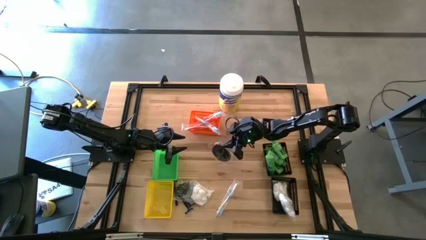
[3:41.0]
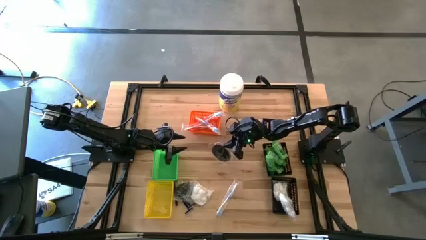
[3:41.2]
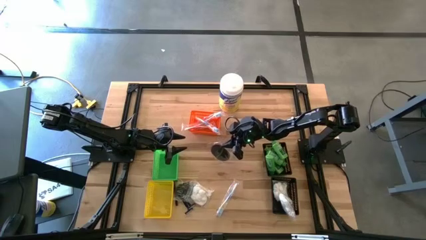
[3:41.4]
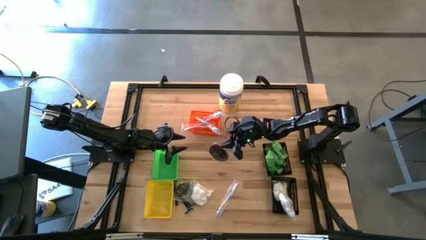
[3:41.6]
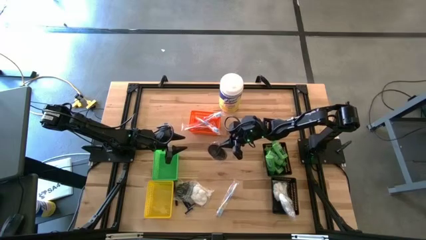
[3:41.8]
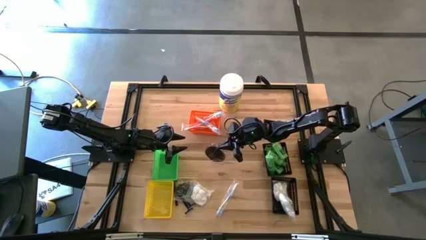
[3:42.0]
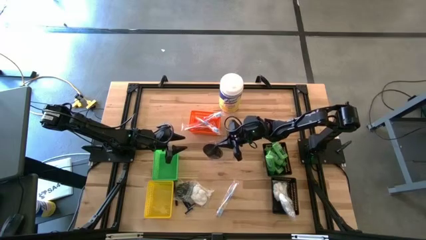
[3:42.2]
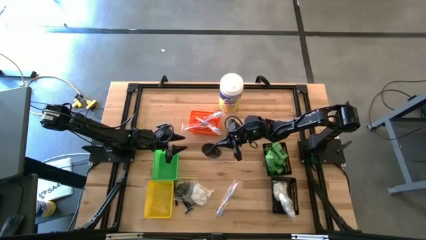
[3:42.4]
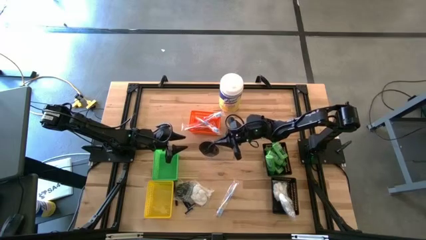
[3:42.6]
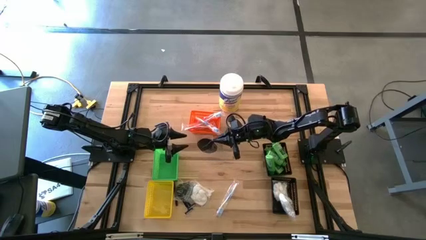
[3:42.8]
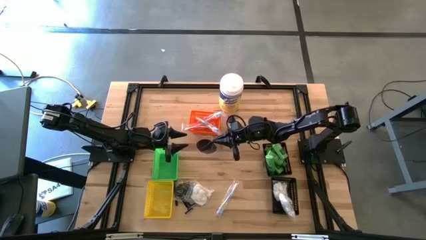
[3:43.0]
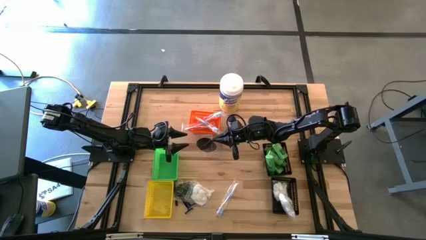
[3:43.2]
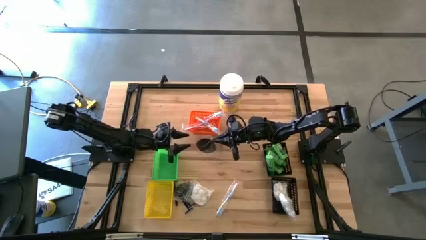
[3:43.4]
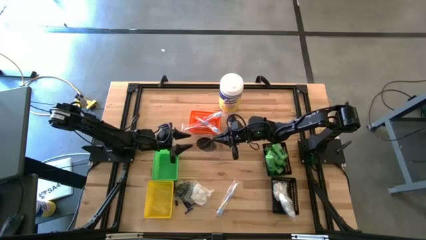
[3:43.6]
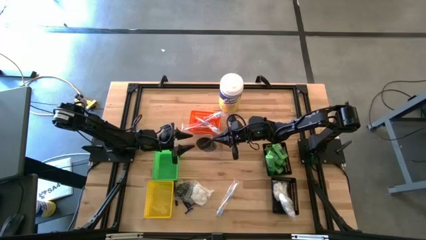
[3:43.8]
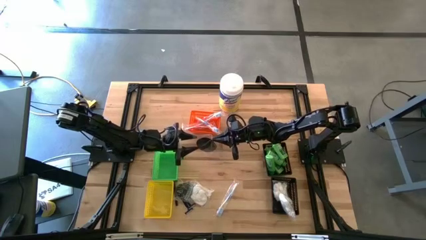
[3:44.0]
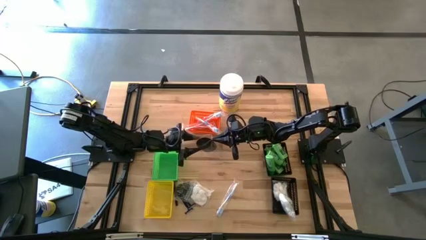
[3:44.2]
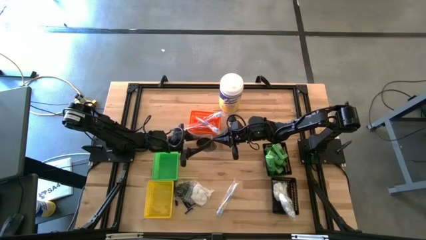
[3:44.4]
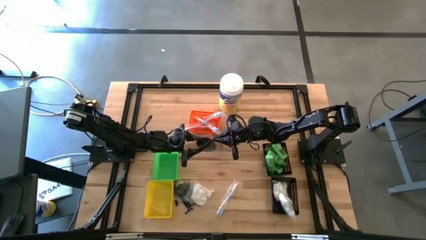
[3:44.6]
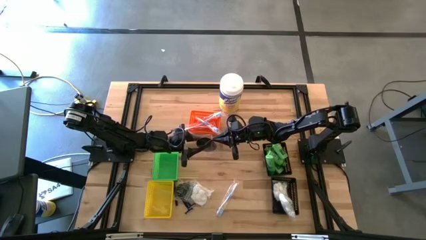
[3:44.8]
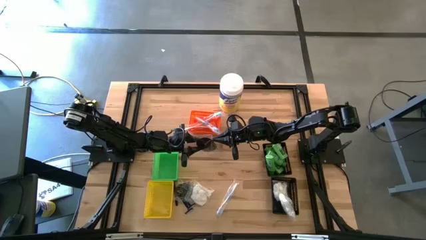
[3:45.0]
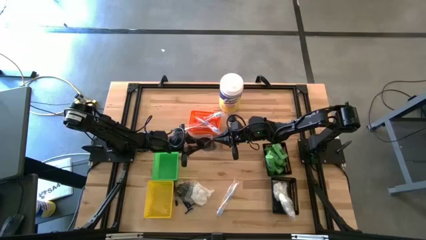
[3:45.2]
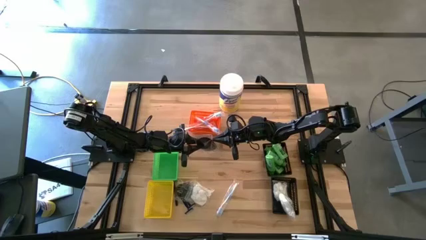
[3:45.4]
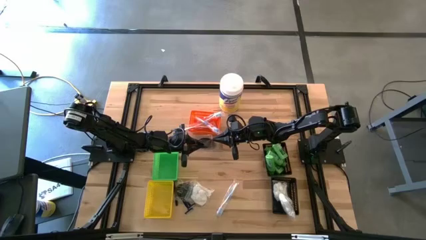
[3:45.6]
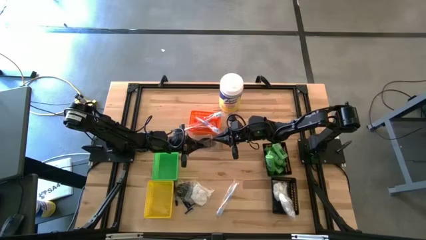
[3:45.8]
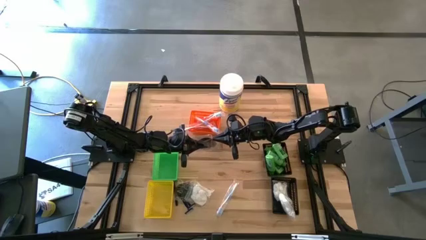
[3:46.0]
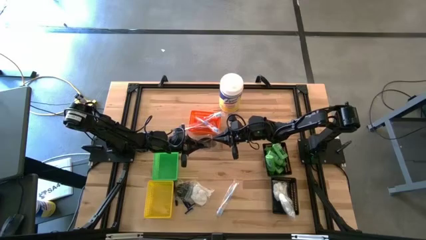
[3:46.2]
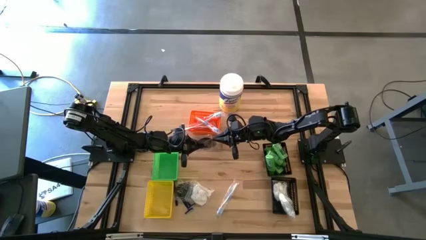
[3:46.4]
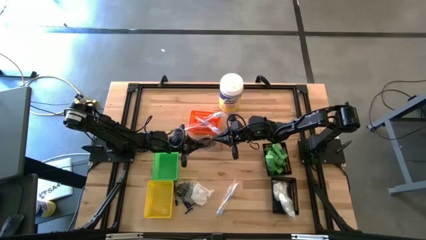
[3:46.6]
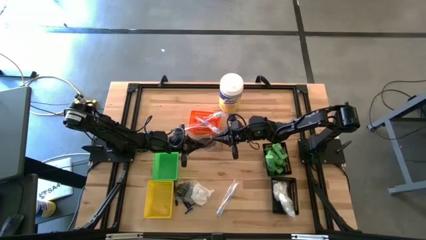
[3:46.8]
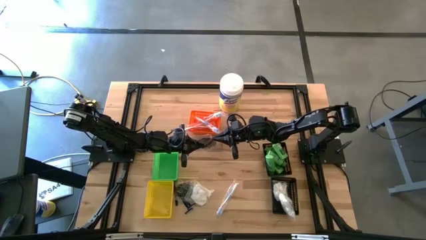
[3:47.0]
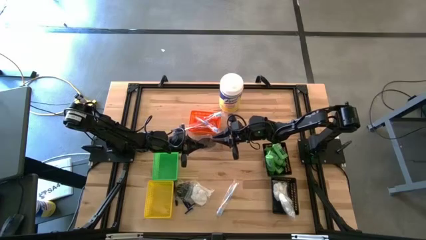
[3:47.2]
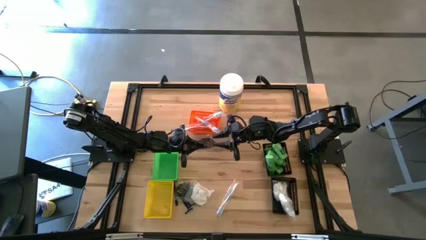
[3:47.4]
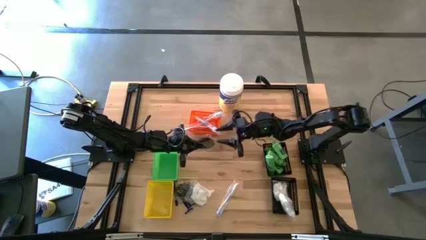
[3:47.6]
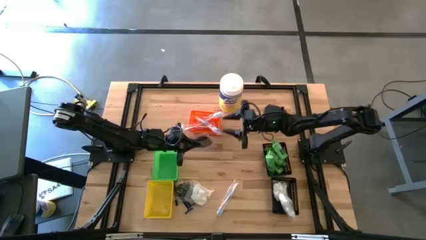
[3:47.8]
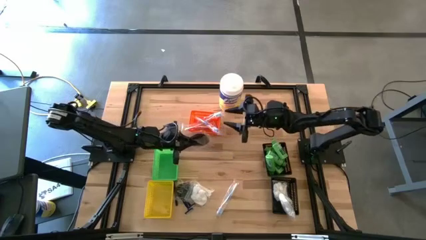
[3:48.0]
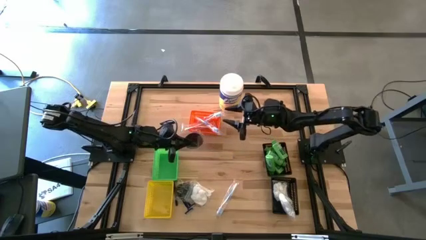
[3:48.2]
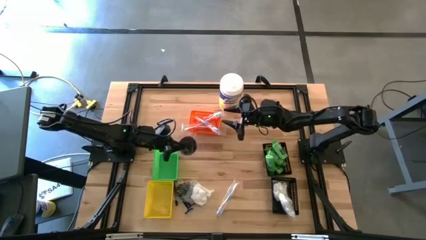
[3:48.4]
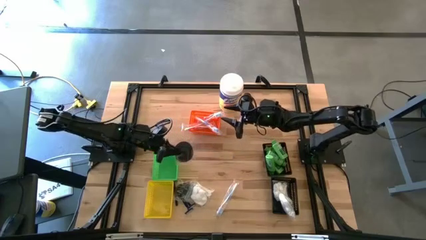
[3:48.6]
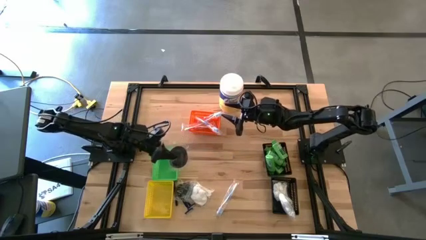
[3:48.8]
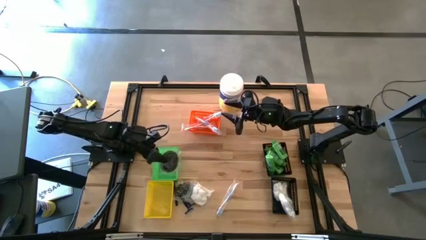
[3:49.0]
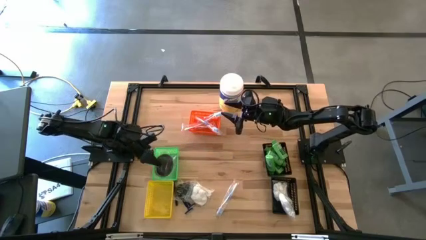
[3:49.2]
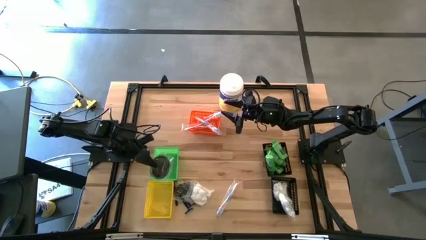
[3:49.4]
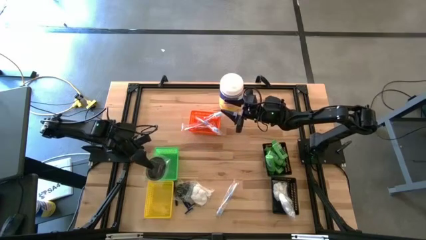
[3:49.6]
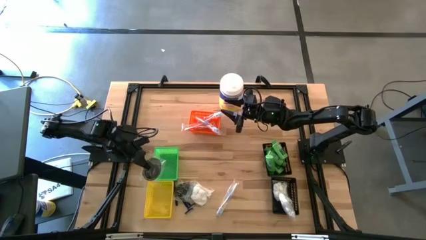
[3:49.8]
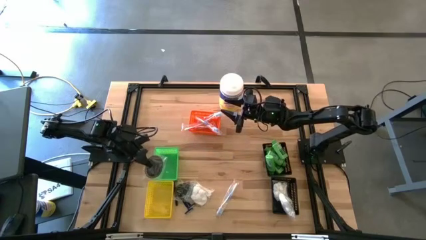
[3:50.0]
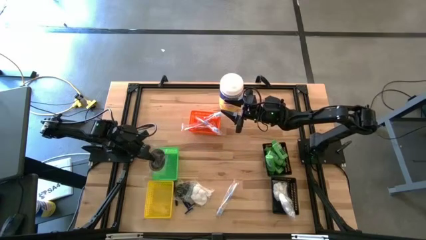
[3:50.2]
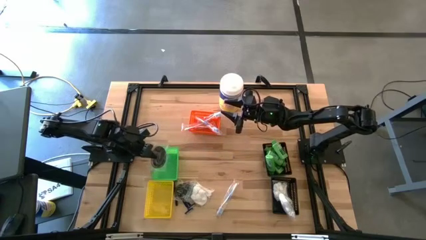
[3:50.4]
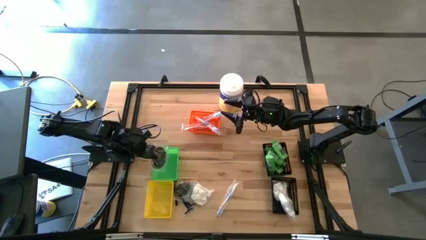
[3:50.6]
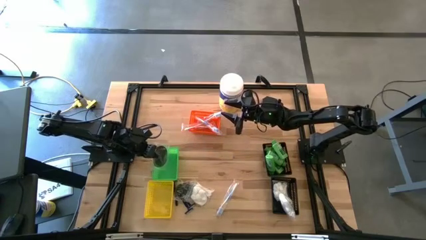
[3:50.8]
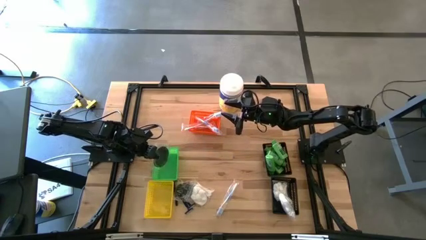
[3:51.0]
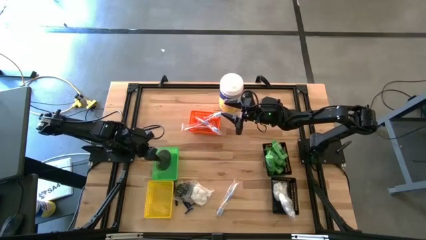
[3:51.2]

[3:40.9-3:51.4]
Task: Pick & Place Travel size toiletries
Put the black hairbrush into the green bin

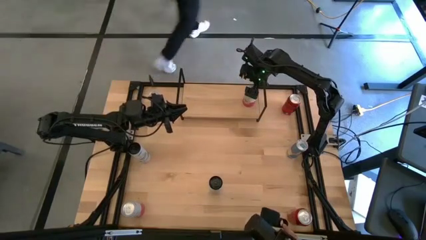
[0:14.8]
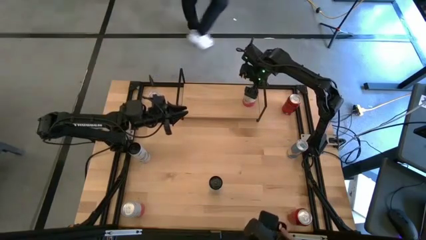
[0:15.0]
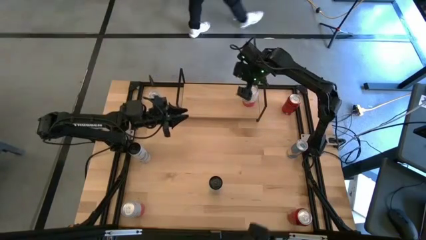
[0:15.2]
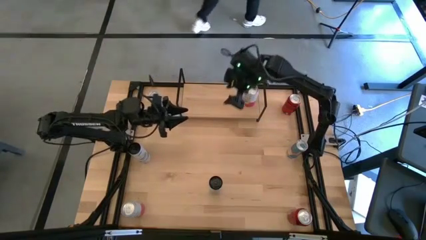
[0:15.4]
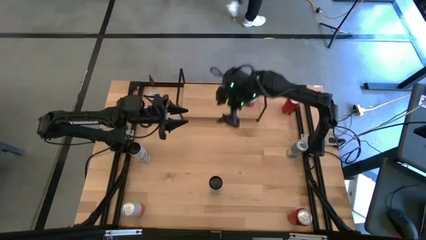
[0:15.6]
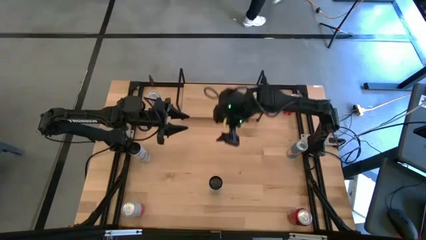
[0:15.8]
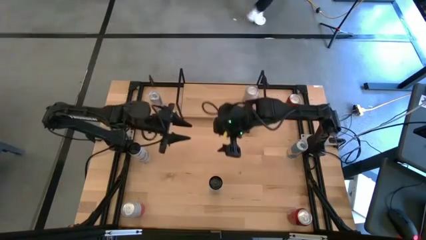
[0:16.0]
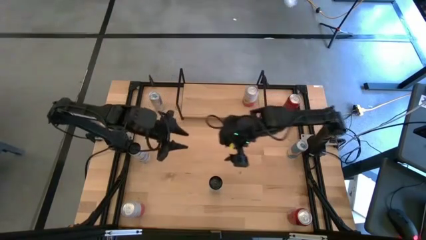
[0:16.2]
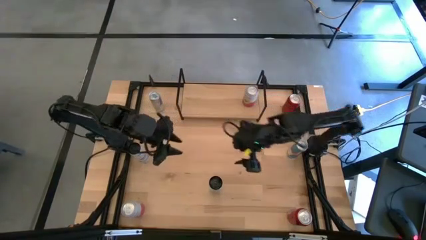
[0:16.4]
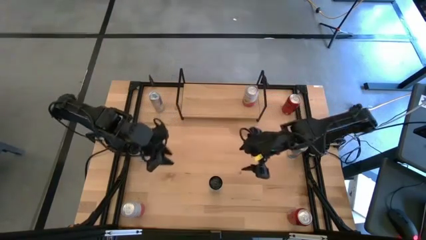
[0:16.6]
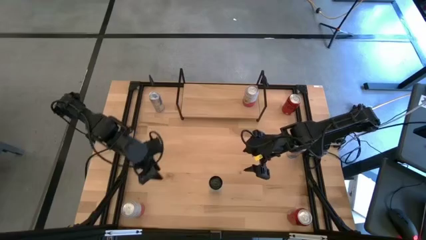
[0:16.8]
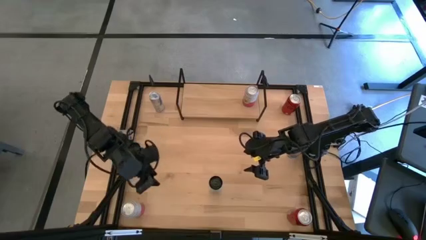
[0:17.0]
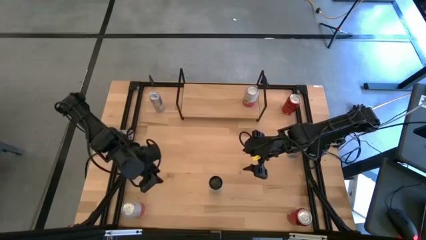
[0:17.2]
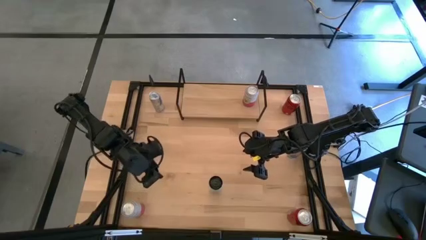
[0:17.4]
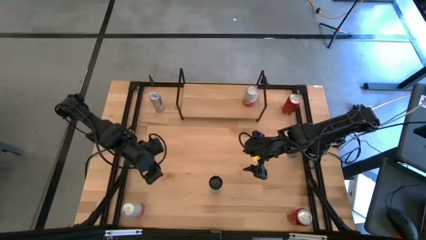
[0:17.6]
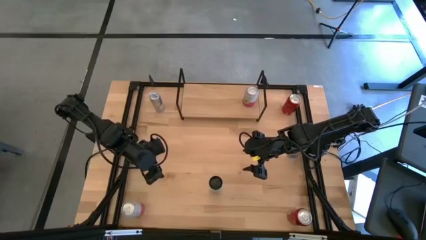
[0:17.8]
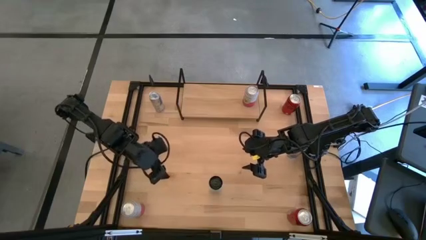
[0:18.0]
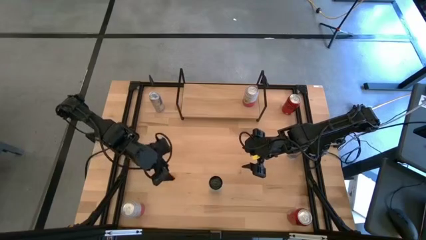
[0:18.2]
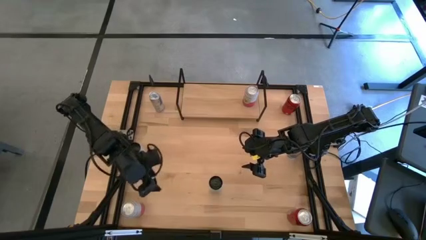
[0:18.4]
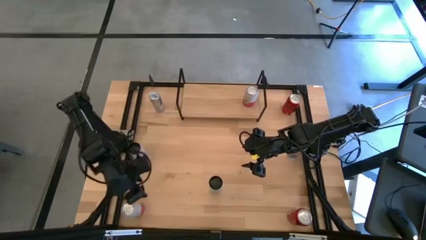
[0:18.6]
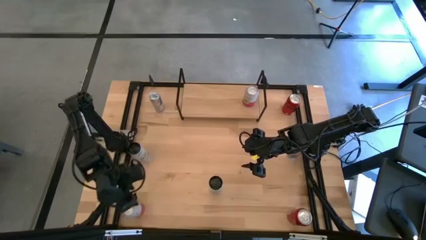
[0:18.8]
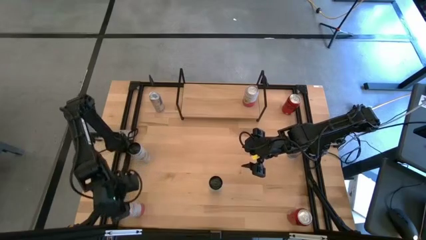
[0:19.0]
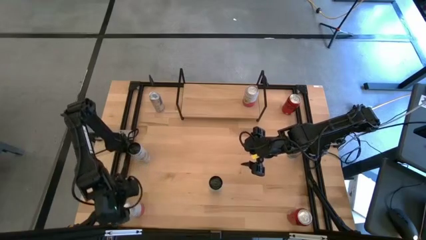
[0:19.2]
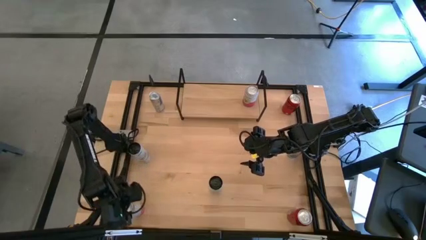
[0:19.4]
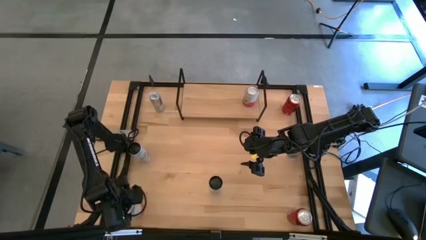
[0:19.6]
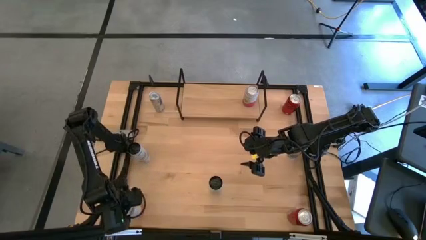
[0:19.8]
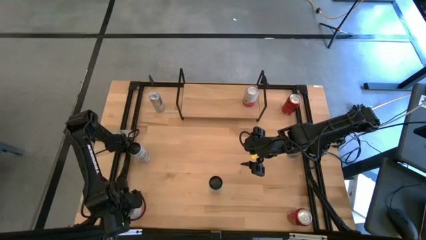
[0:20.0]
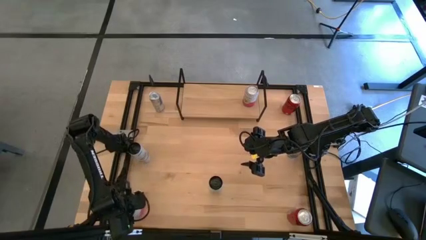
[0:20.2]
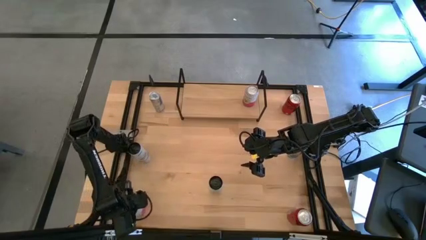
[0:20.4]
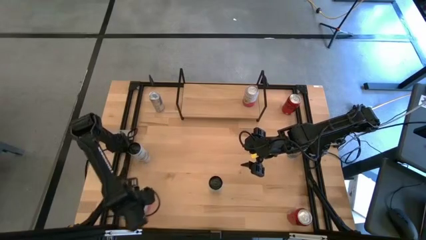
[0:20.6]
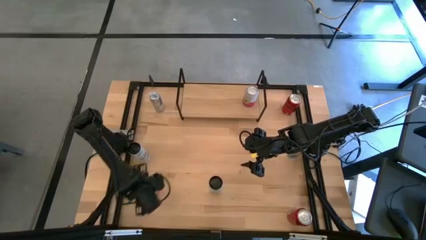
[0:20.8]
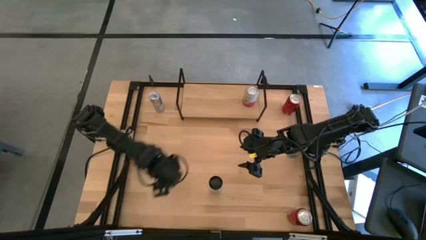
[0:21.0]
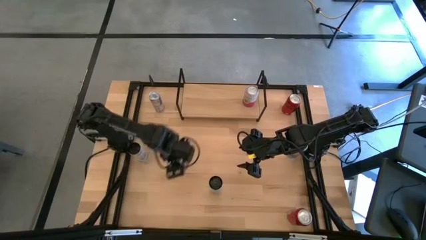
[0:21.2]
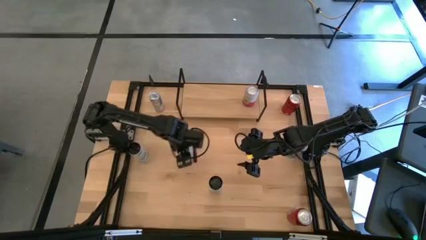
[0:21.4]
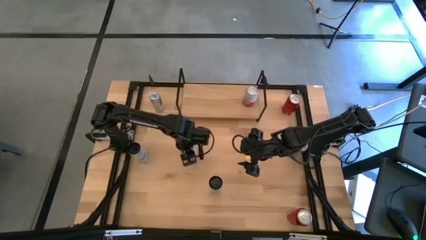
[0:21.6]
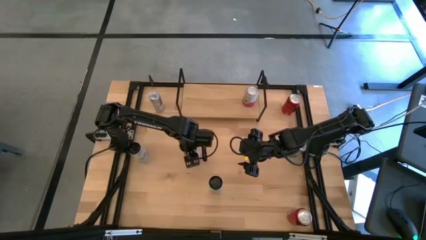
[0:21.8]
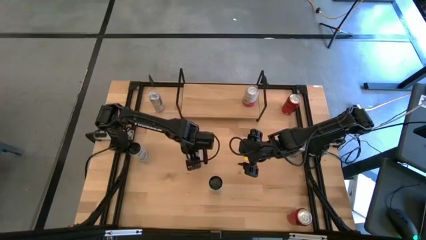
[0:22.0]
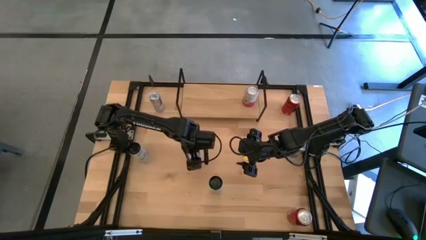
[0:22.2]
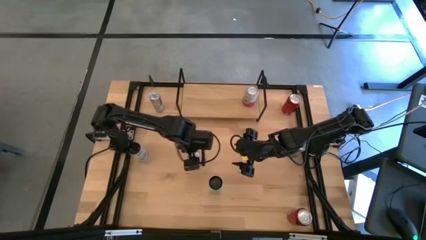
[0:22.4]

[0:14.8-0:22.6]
Task: Place canned beverage on shelf
Move the pink soda can to the center of the table
